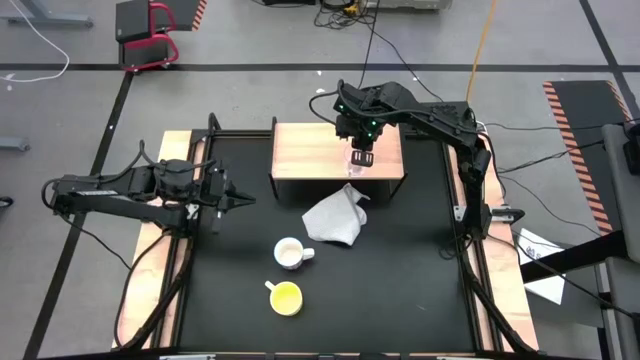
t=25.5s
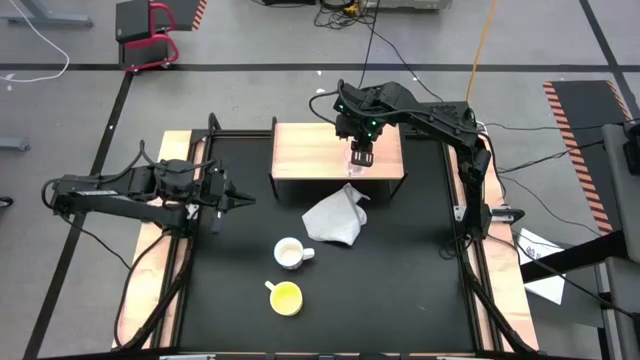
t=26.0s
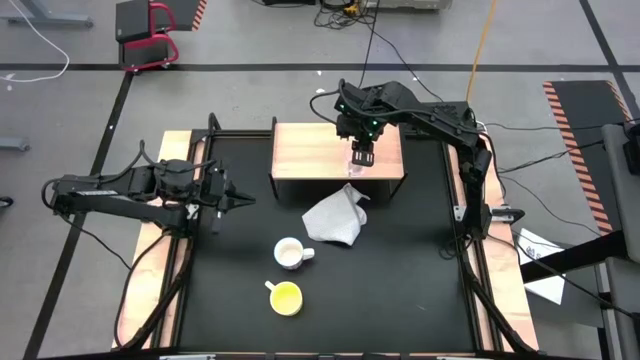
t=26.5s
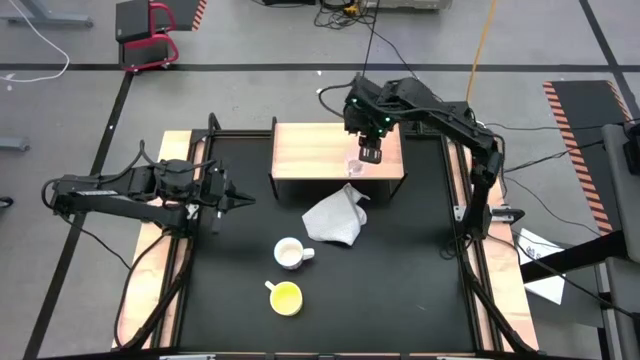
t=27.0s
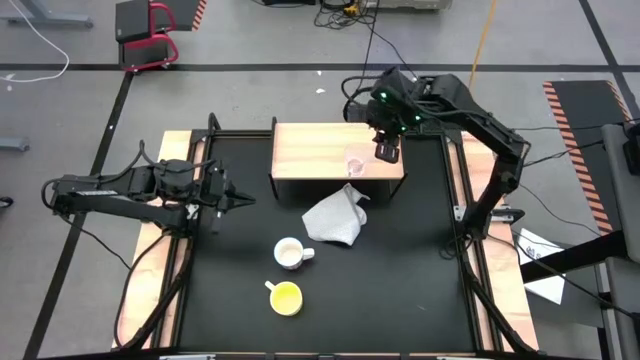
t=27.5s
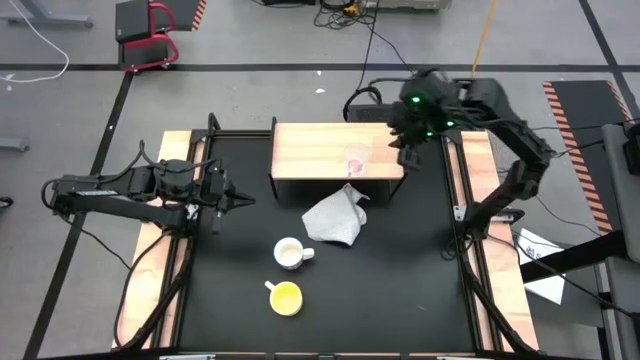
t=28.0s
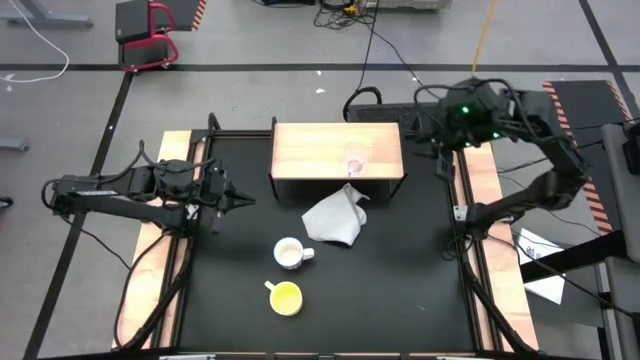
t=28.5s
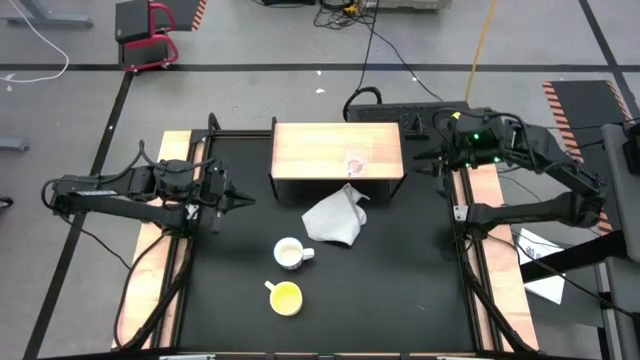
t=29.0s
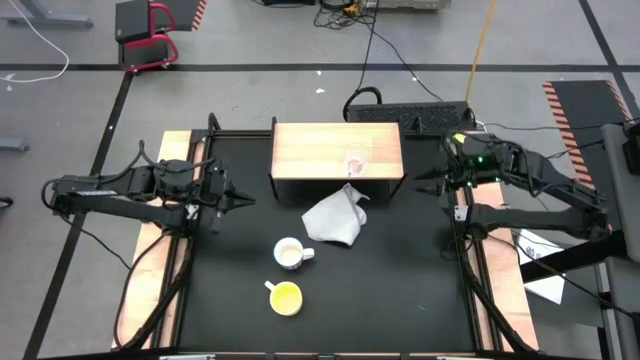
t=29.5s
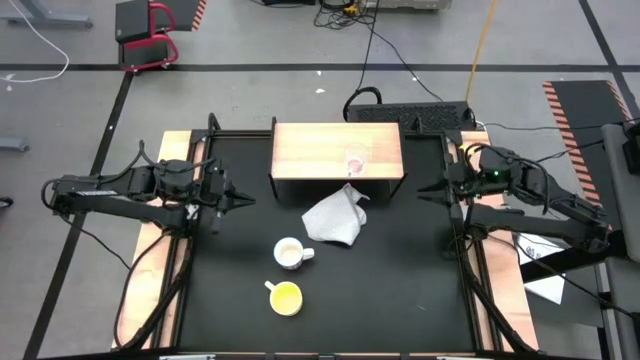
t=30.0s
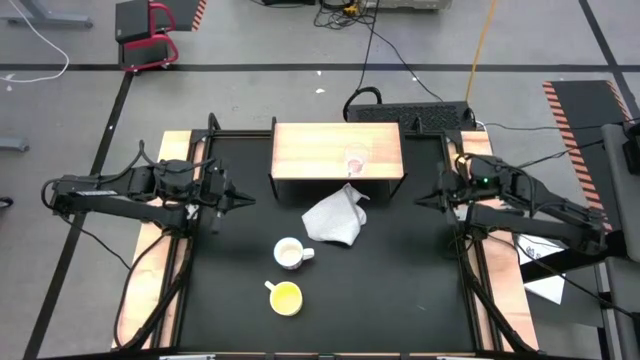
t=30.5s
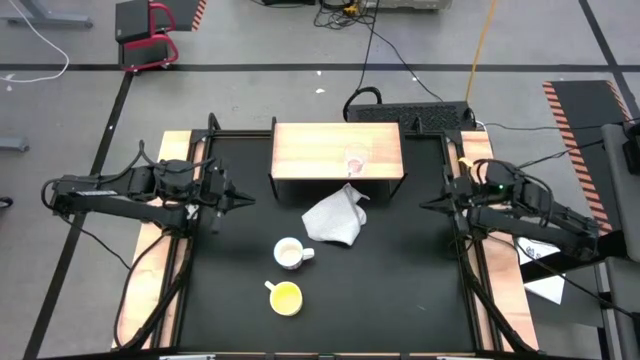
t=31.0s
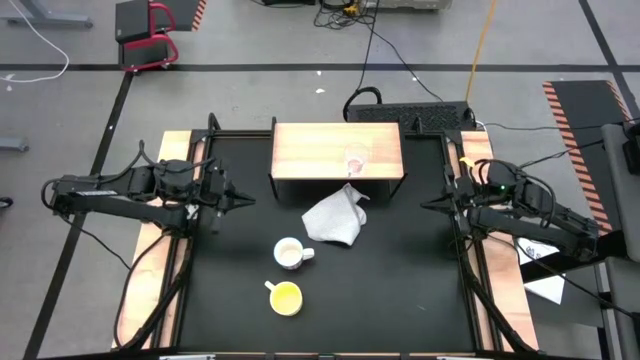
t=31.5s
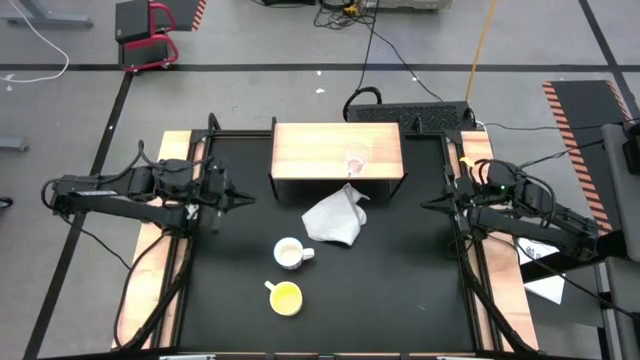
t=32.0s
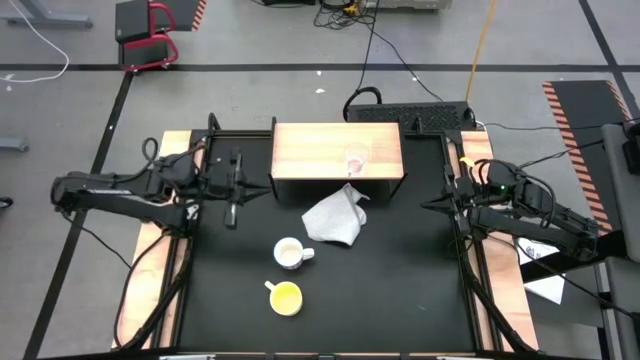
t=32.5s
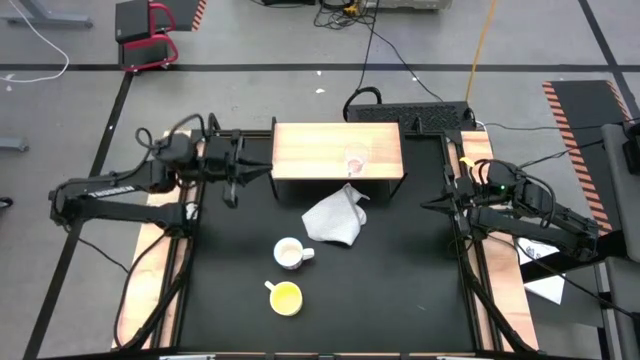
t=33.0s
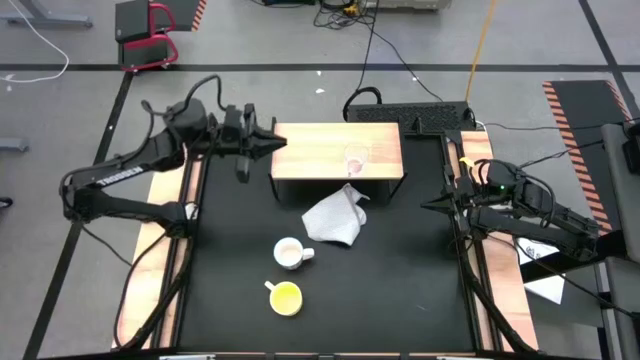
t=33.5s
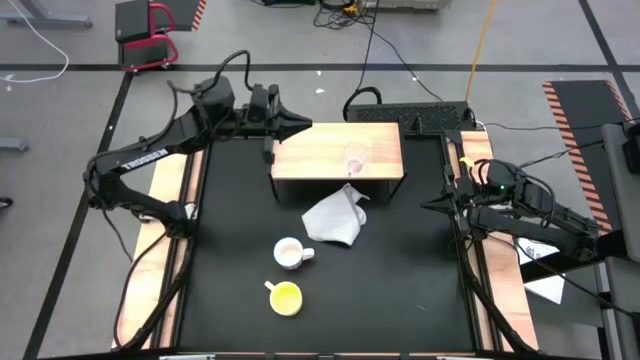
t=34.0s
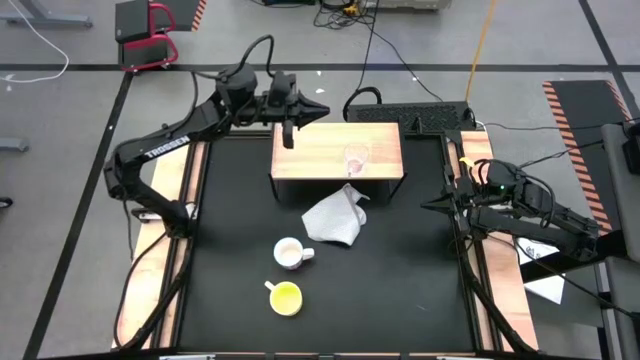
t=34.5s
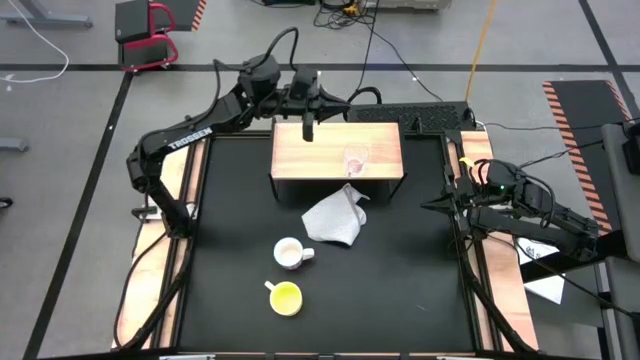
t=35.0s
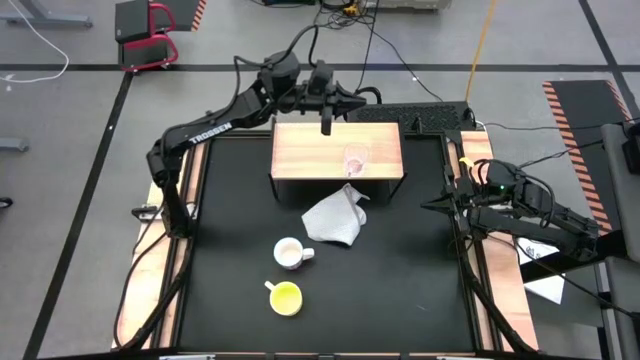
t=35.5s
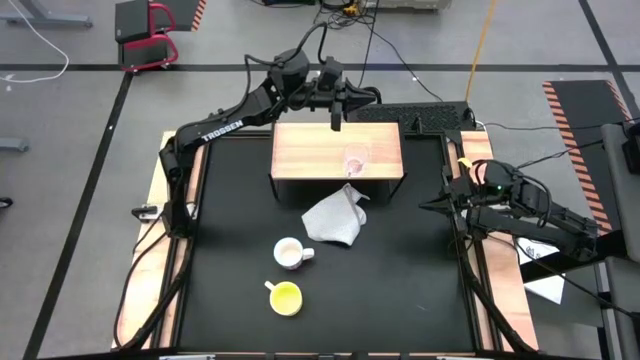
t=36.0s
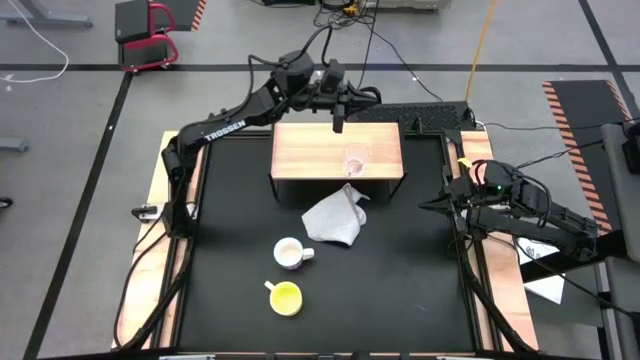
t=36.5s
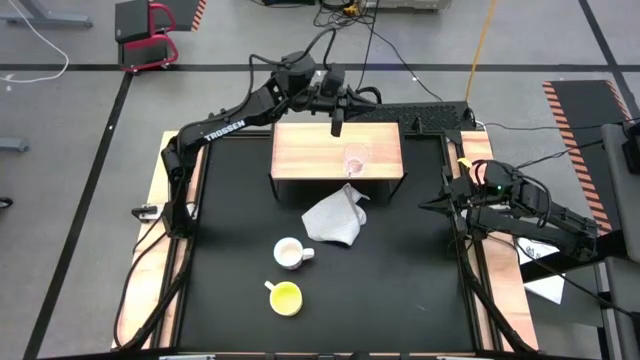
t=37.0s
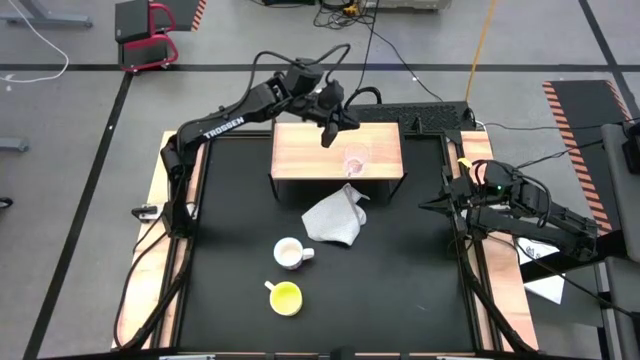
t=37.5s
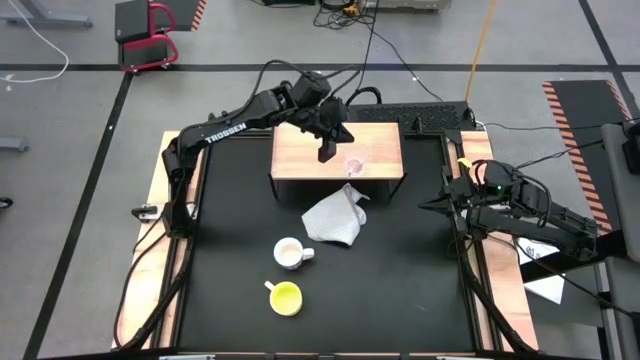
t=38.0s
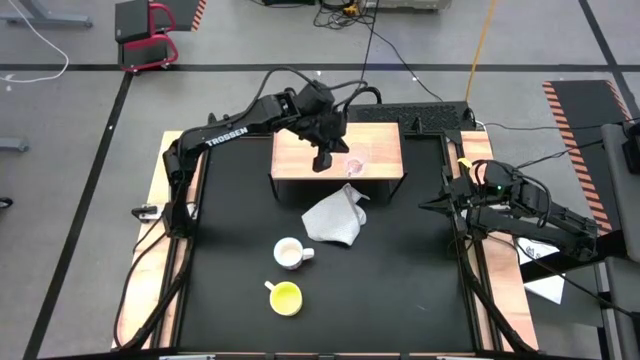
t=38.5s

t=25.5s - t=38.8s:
Task: Stack small to large cups/mugs on shelf
Adjust the transparent mug on the shelf
